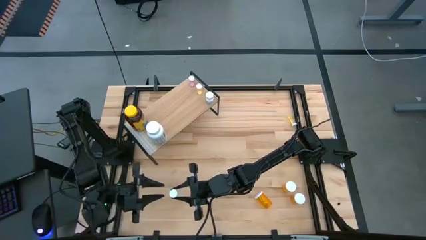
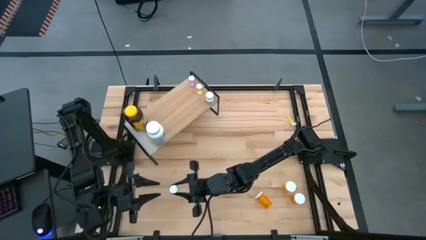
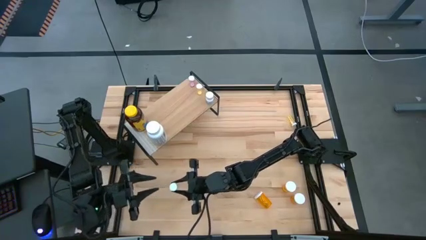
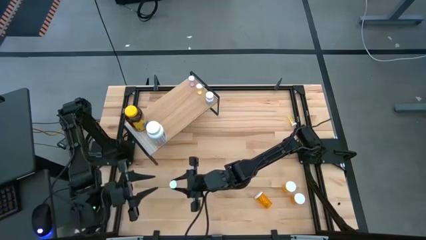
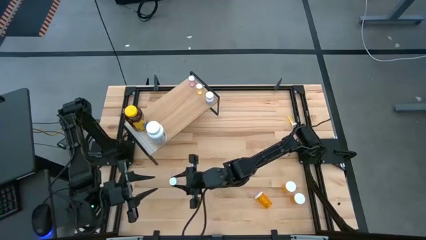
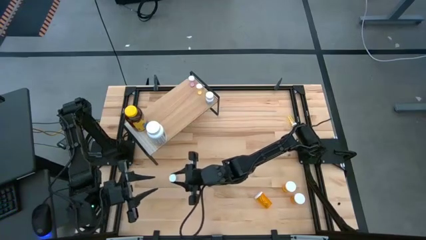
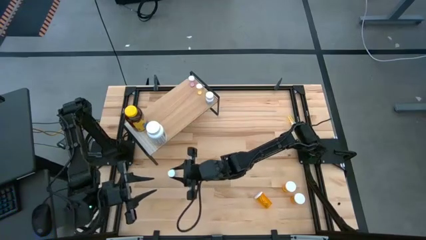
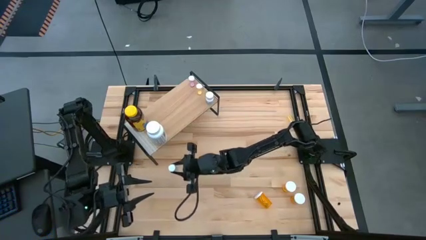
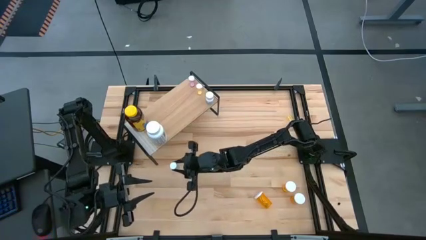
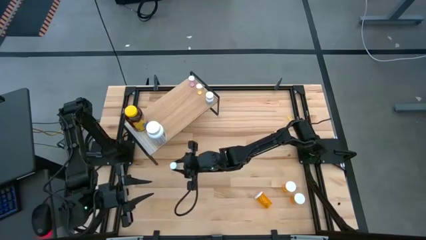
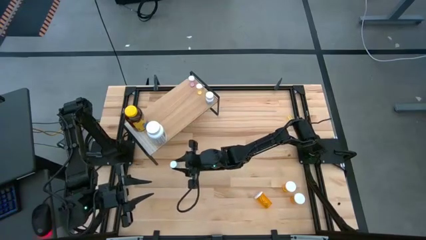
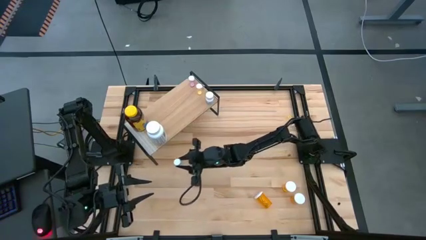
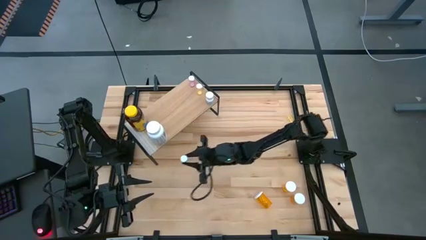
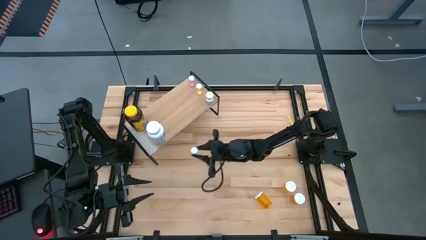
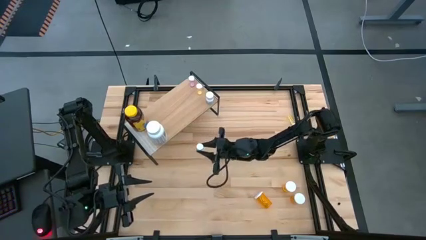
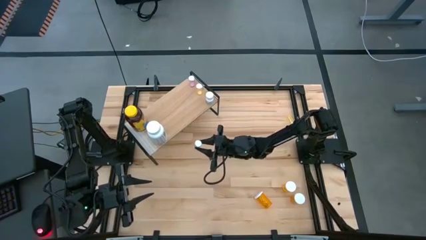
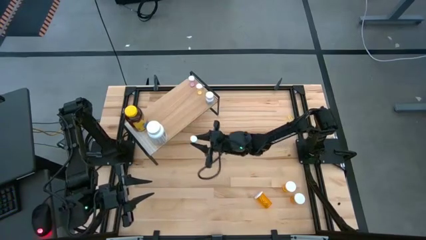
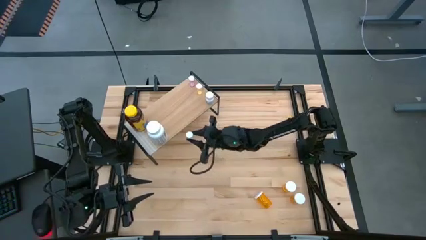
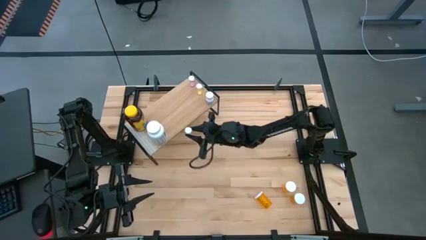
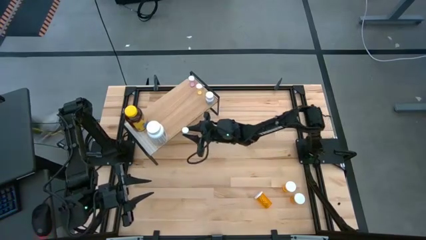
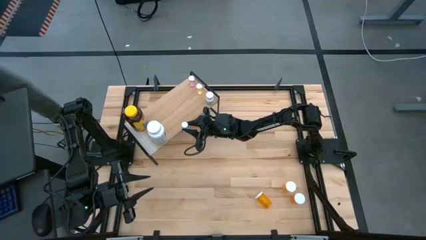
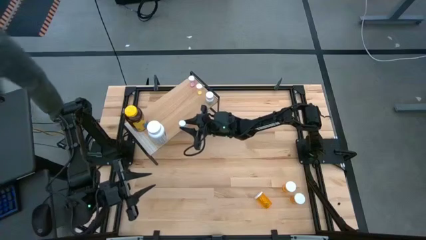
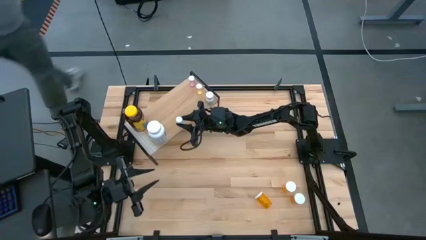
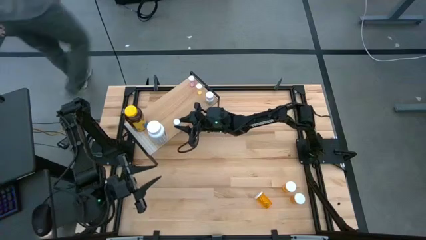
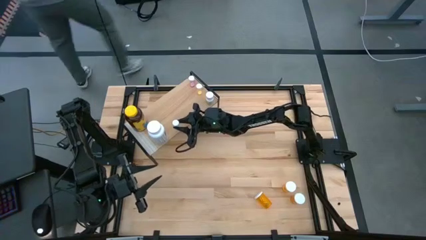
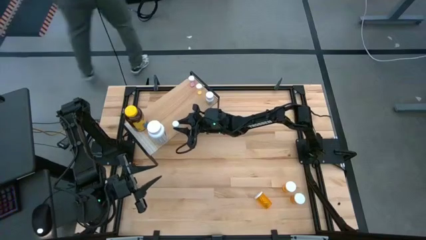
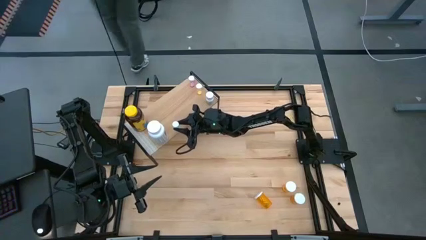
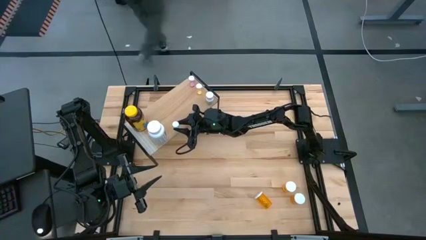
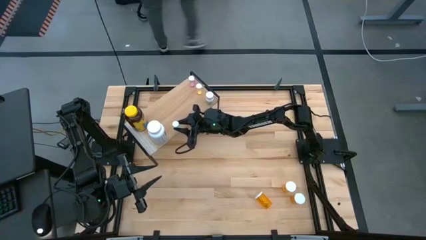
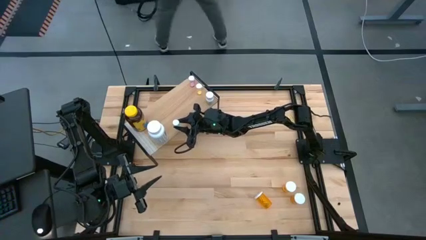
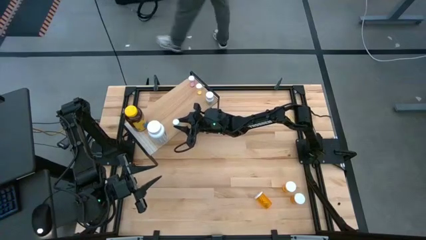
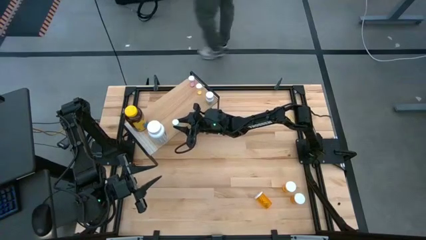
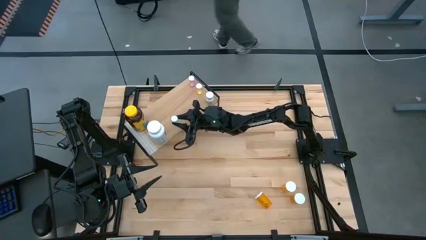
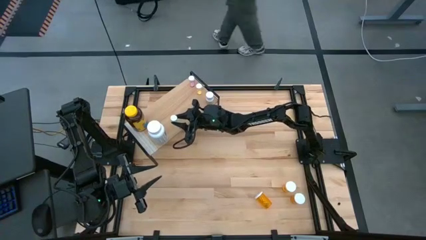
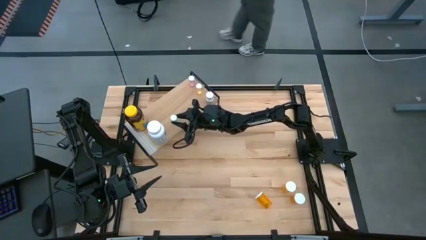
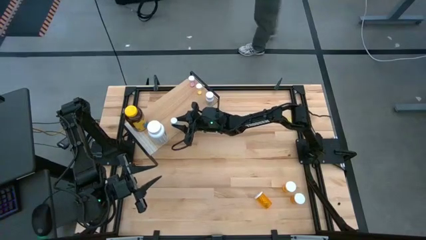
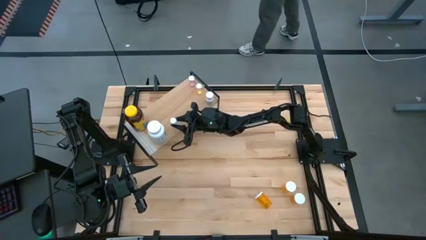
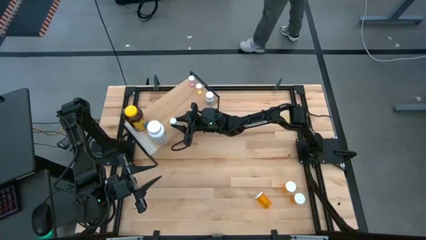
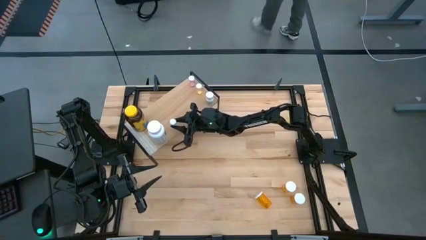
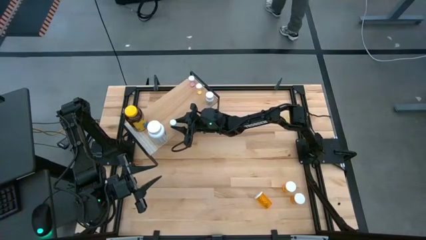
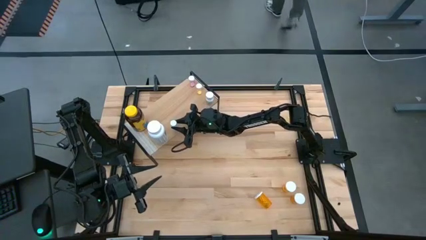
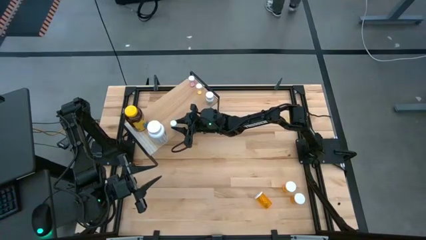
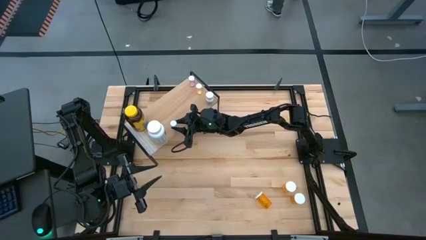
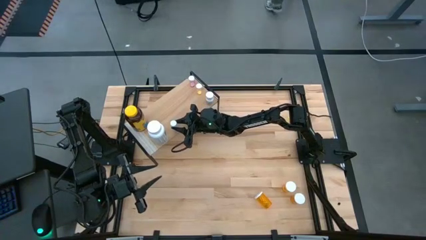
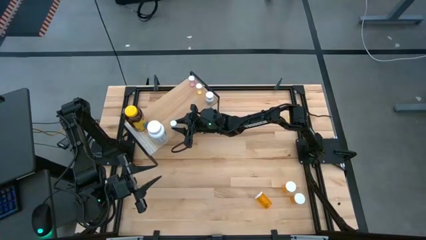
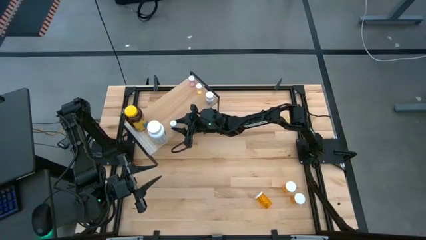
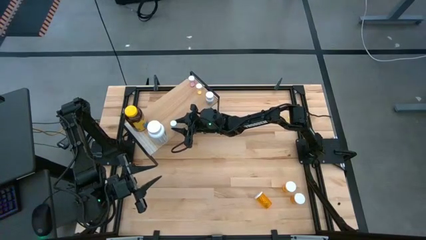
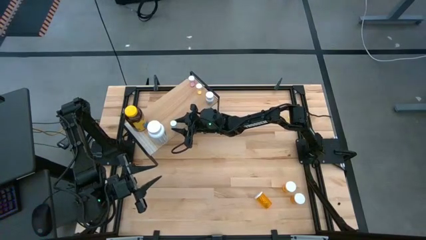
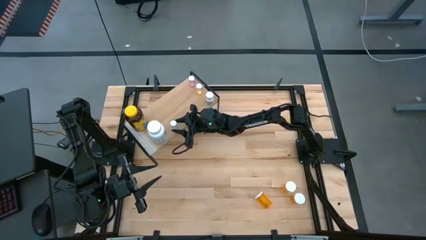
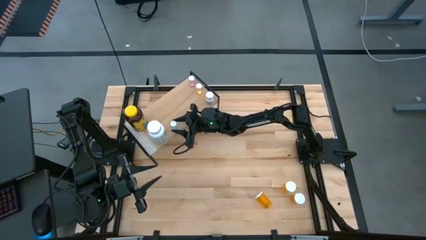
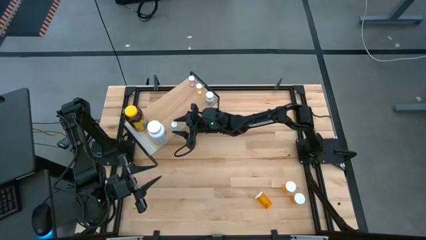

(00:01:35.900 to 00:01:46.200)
Task: Pick and place medicine bottles onto shelf by color
Put the blue pill bottle on the shelf
